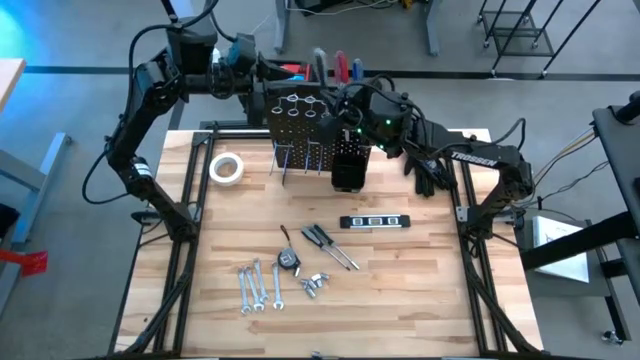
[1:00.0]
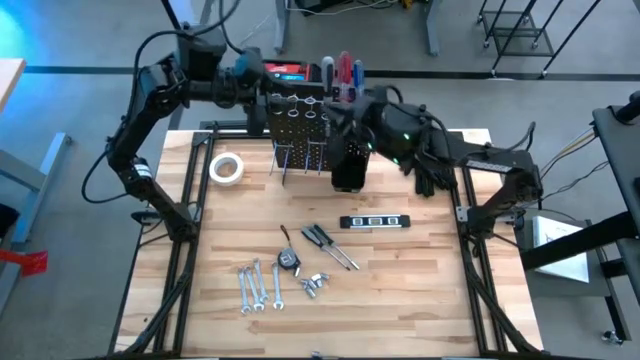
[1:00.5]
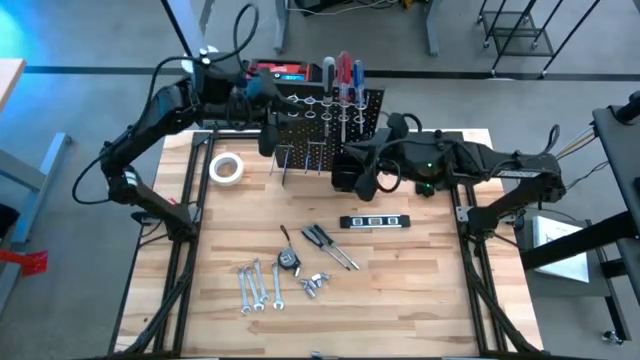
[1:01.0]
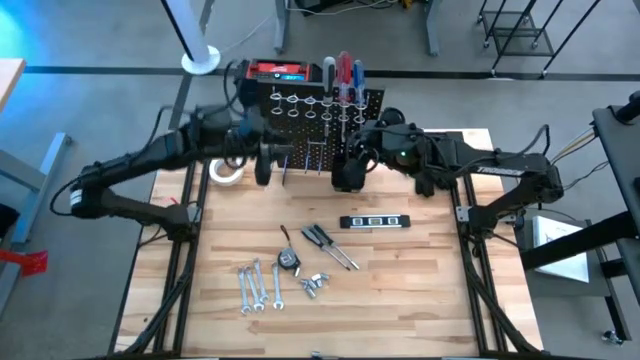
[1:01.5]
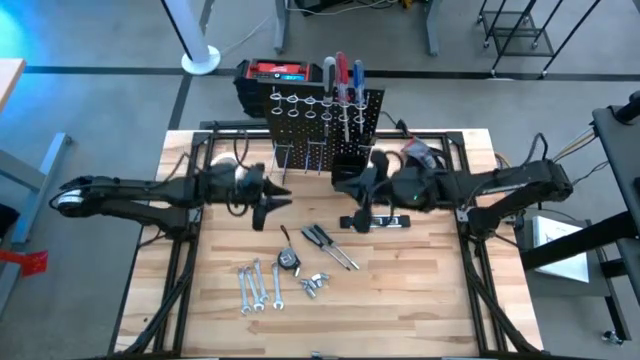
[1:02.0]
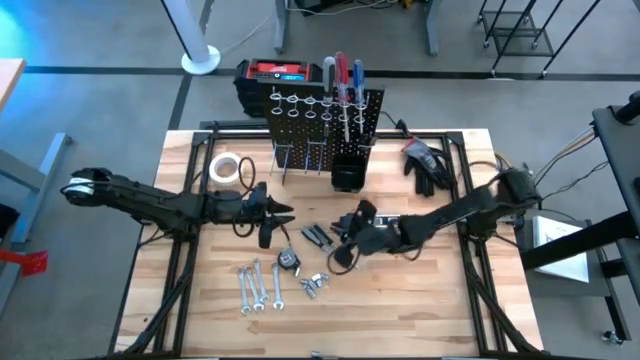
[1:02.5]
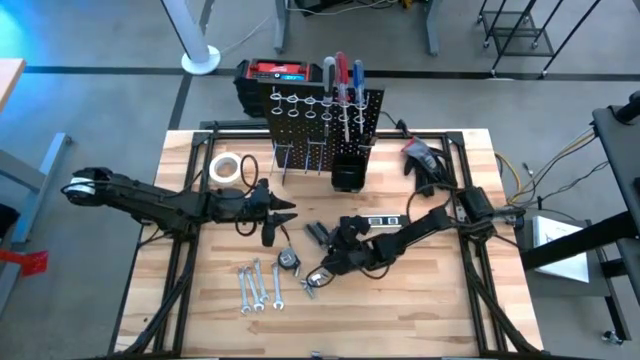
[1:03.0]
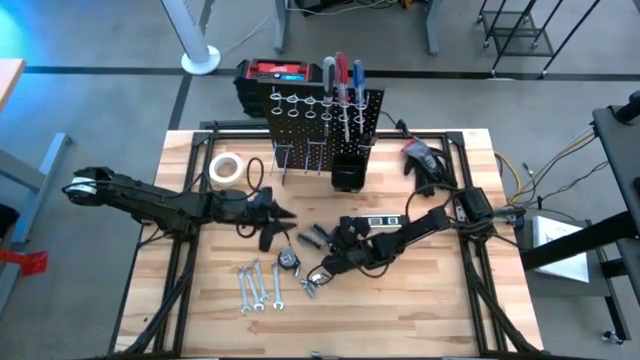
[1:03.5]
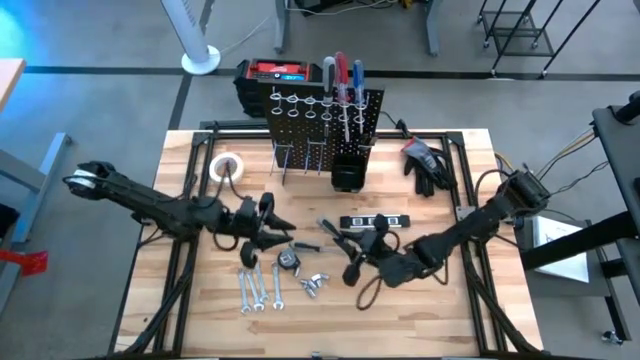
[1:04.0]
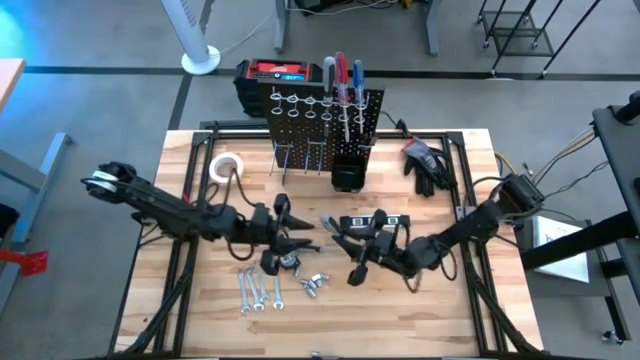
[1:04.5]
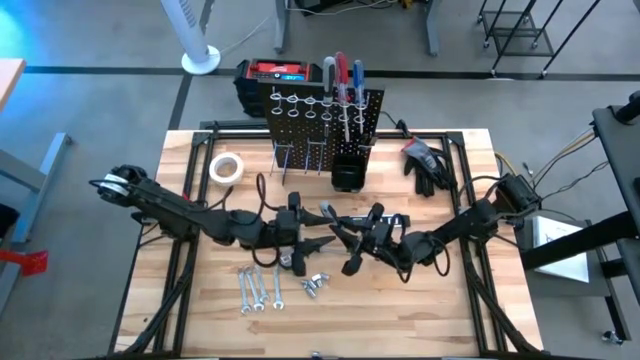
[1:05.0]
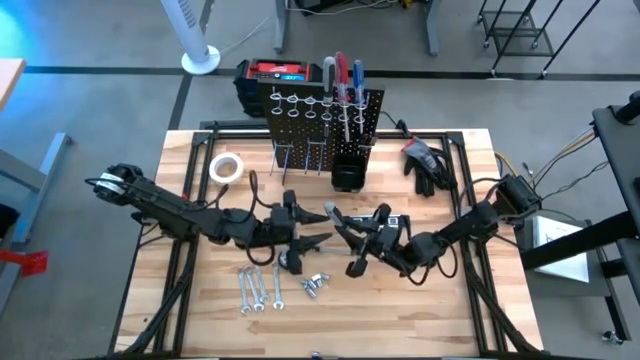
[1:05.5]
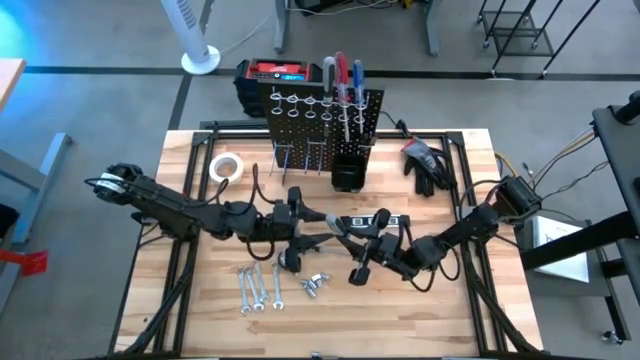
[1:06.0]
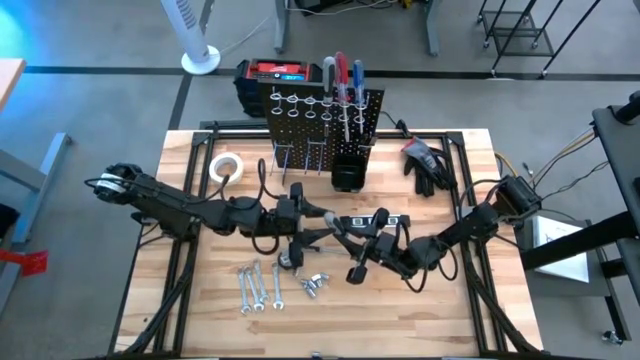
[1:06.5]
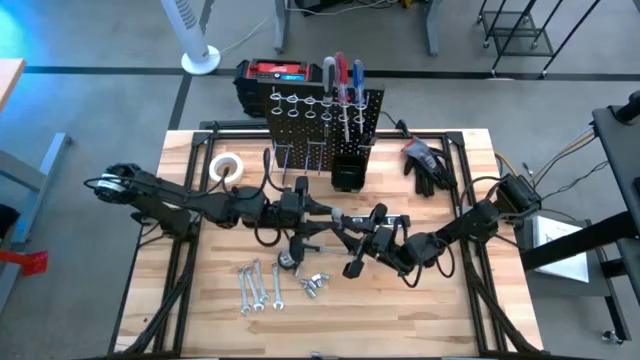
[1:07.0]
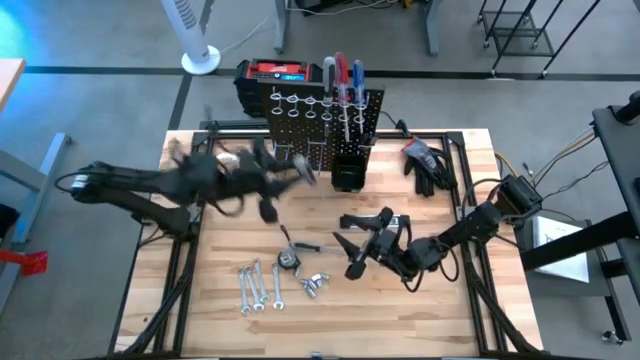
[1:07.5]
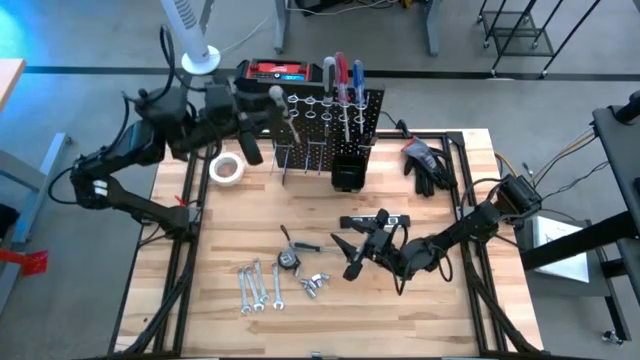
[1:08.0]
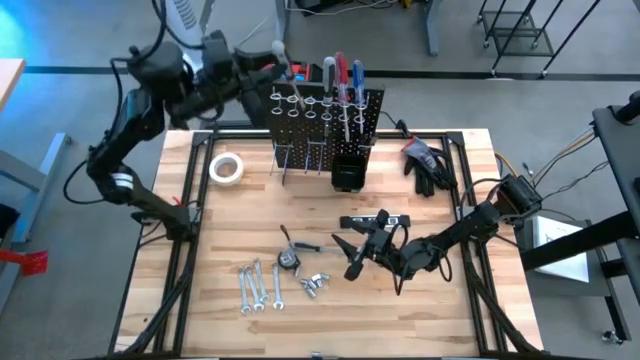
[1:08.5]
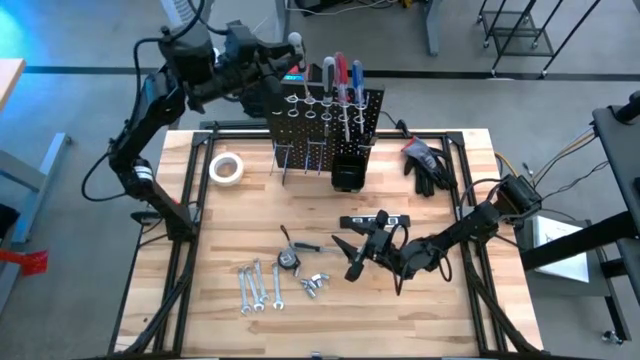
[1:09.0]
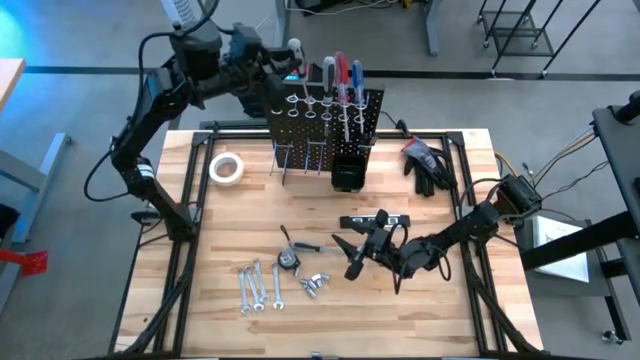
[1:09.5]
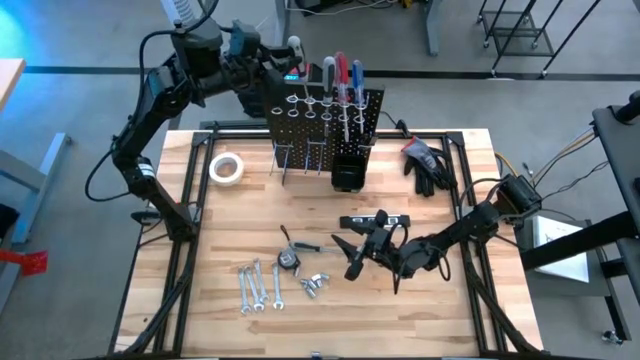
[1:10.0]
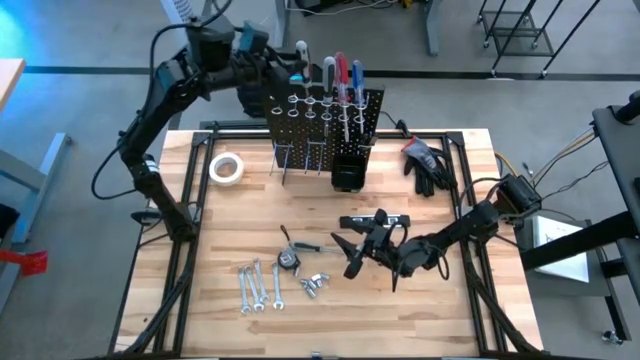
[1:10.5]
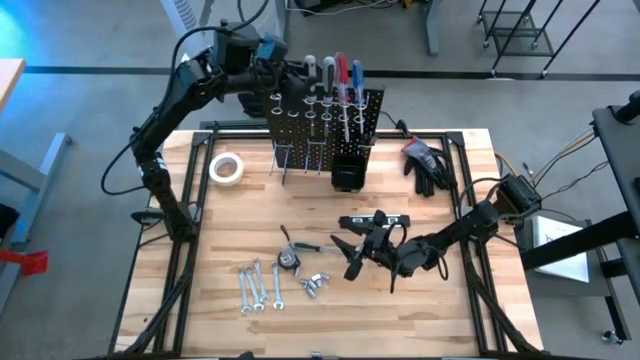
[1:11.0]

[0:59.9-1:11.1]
Task: Hang tools onto peg board
Hang the bit driver handle on the pegboard

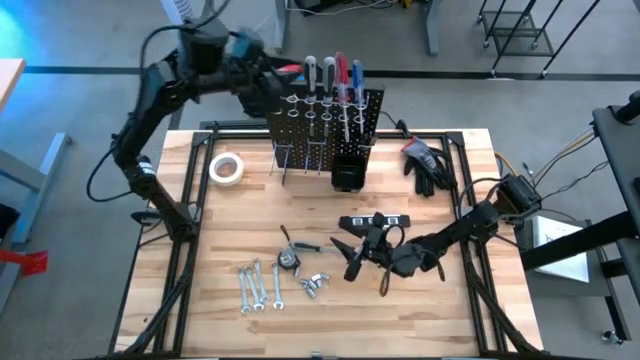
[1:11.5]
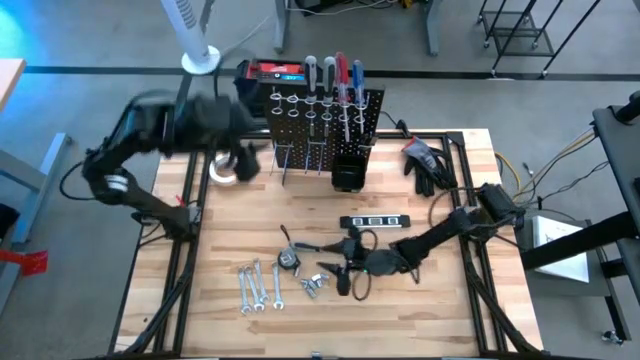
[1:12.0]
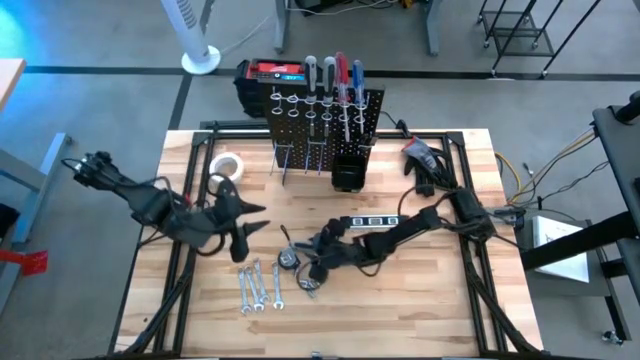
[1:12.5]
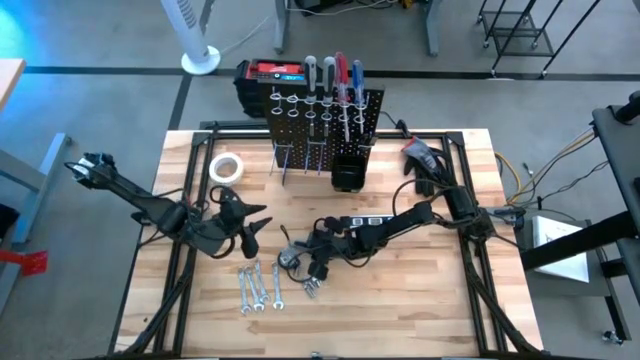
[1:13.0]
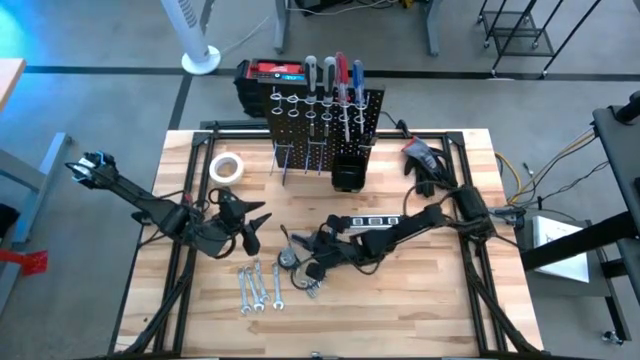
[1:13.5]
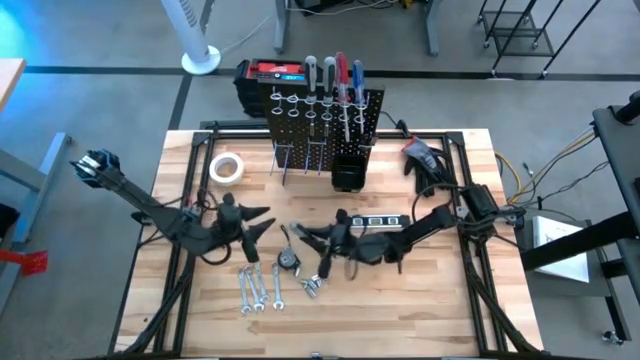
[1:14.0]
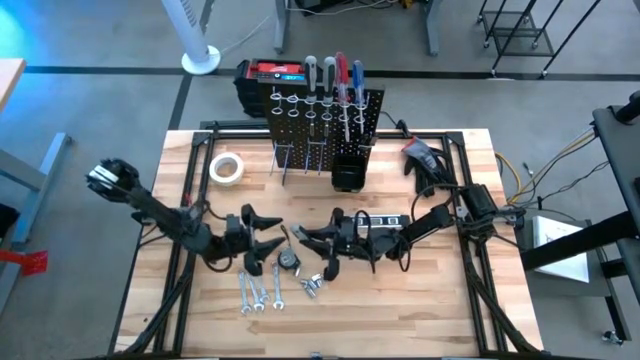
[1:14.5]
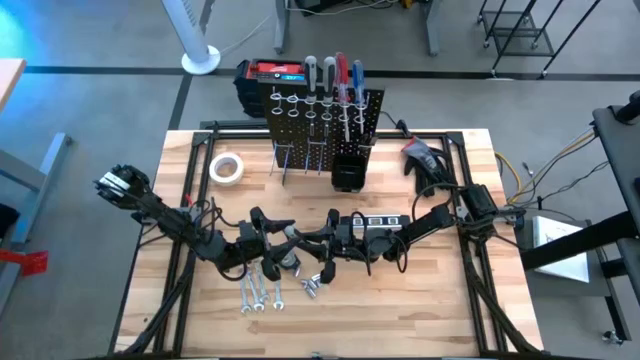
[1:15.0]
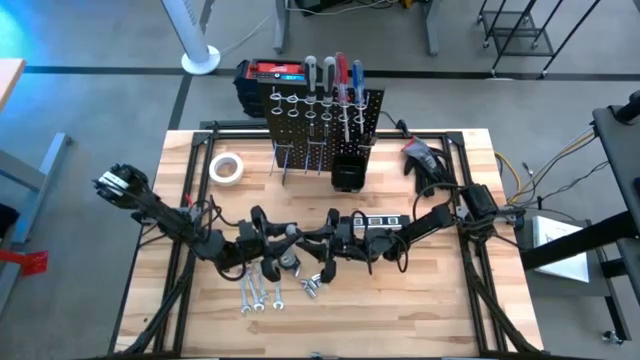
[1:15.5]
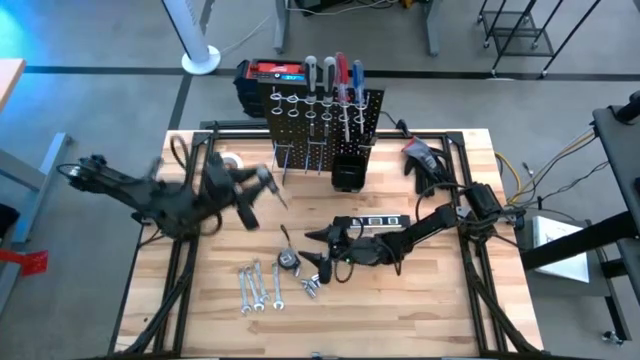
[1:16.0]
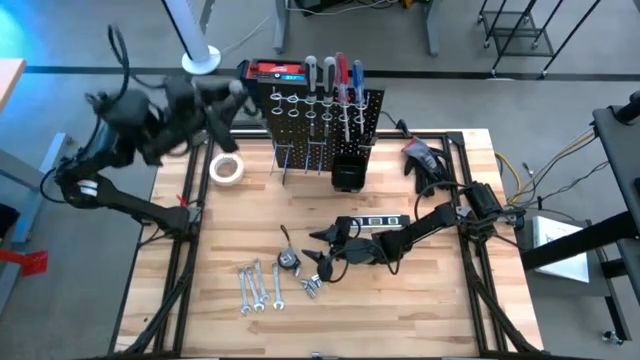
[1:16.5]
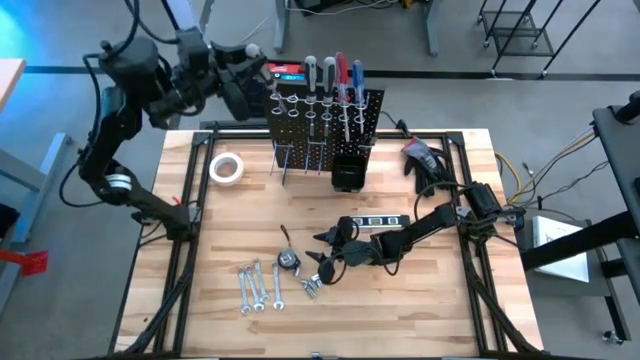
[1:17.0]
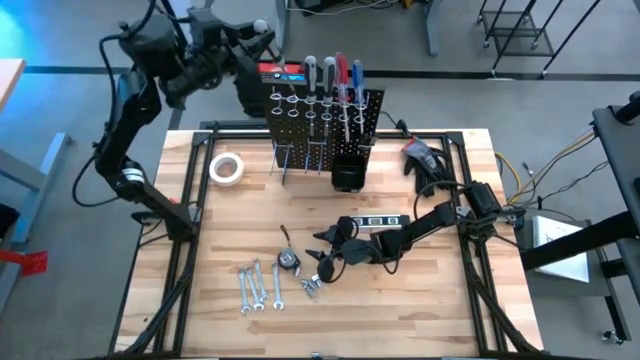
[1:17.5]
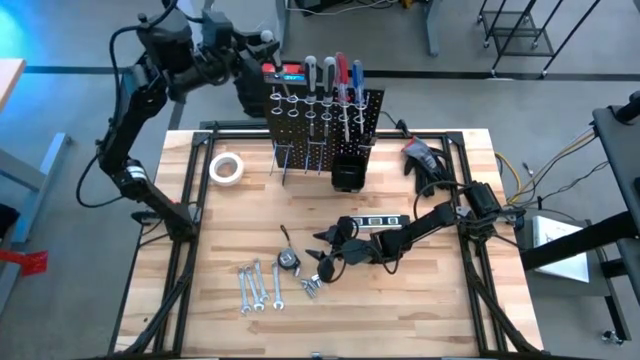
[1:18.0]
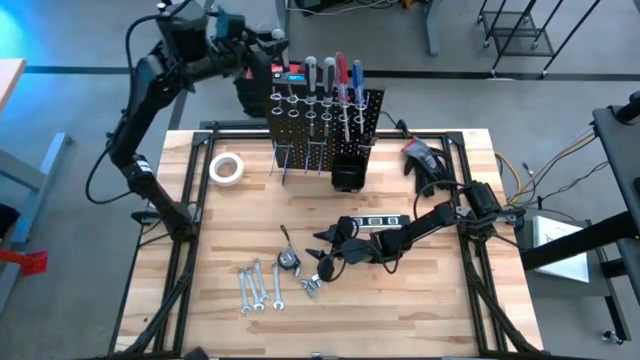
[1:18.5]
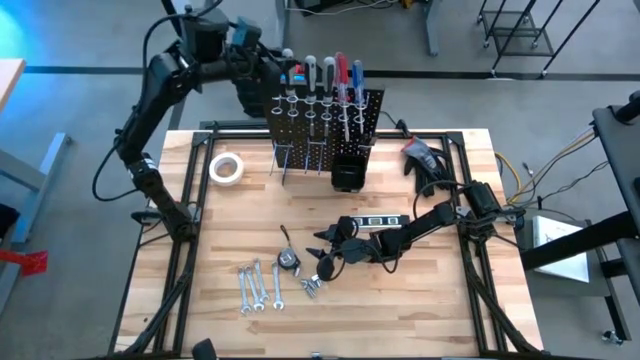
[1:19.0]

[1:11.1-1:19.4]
Hang the gray screwdriver on the peg board

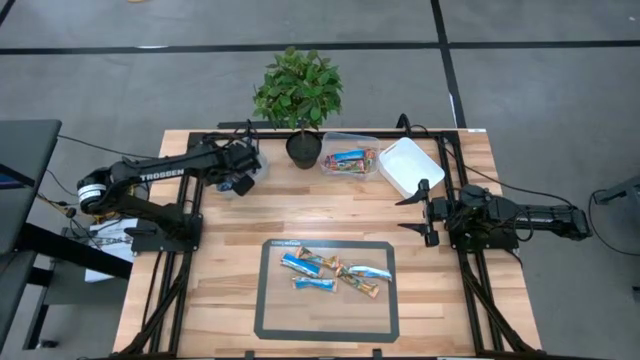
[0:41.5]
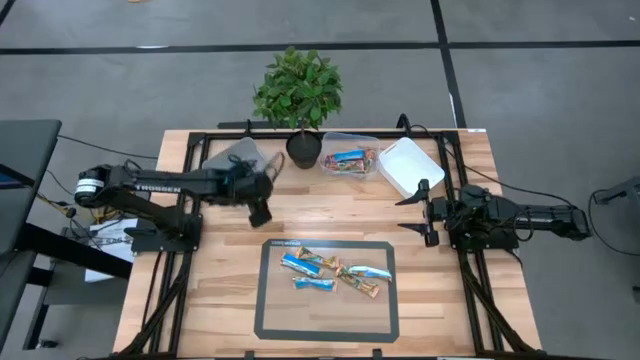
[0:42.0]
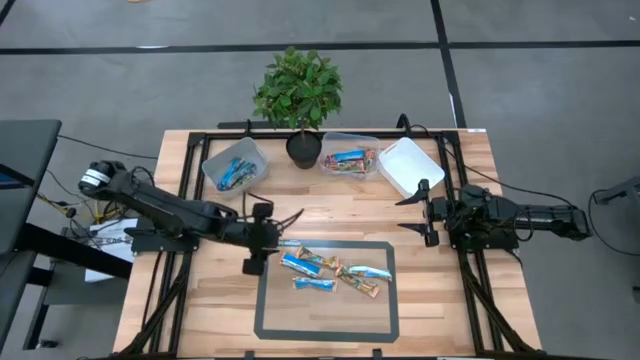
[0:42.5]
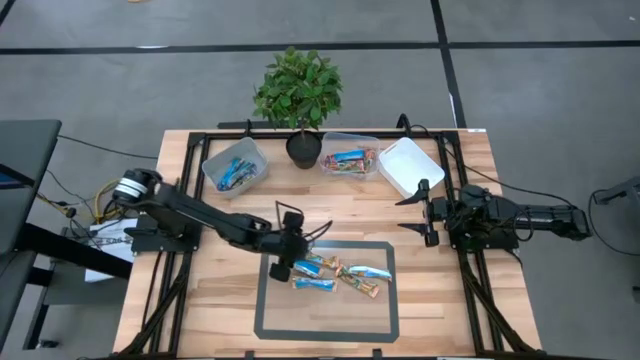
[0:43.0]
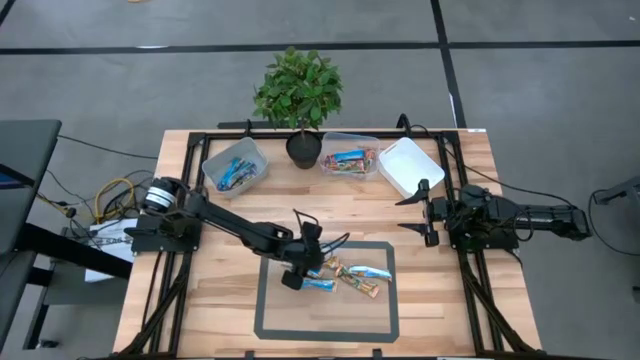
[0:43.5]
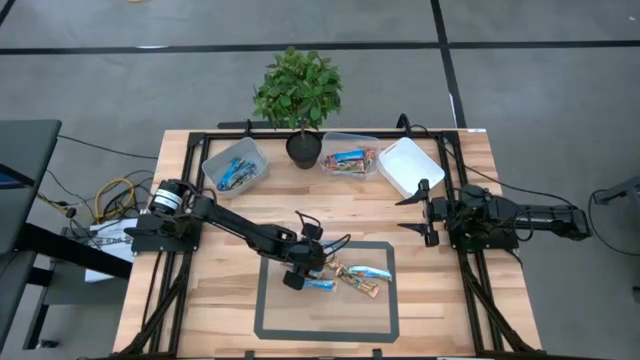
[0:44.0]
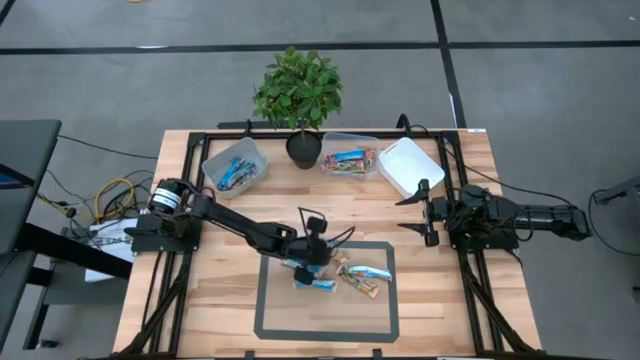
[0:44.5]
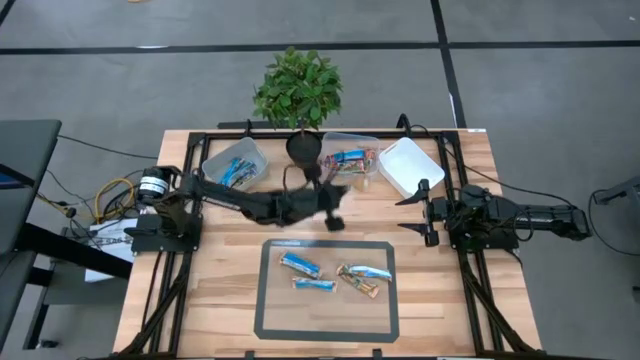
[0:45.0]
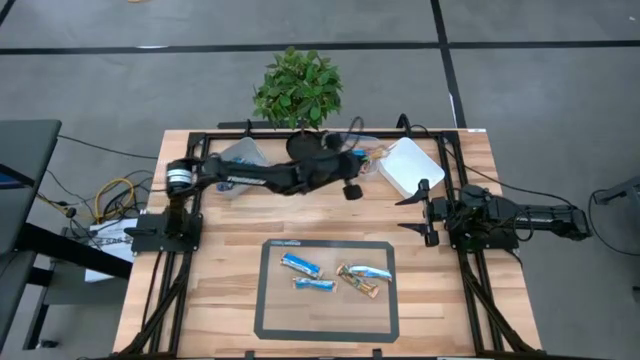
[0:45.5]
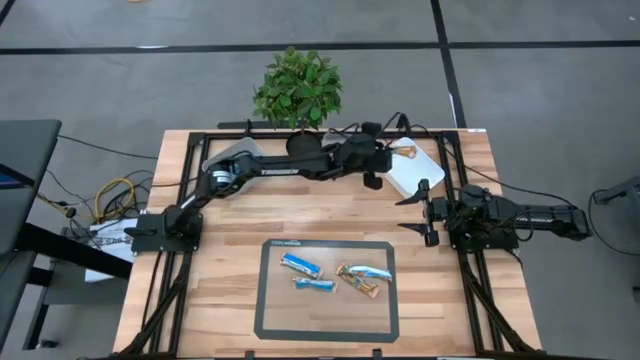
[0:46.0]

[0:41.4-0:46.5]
Task: Pick and place Granola Bars by type
Put the yellow granola bar into the white bin
